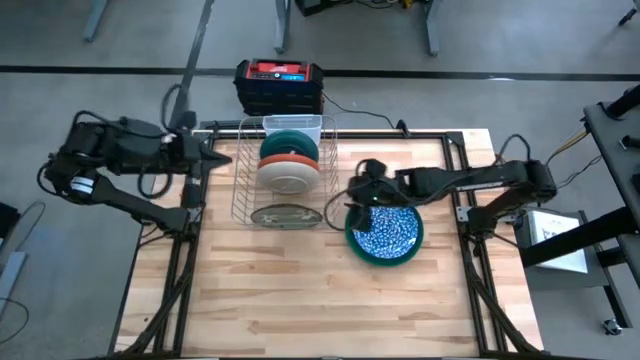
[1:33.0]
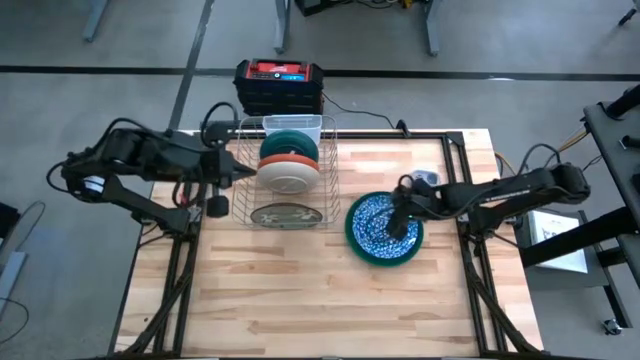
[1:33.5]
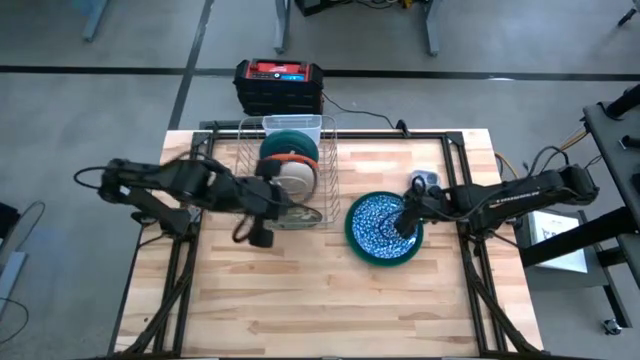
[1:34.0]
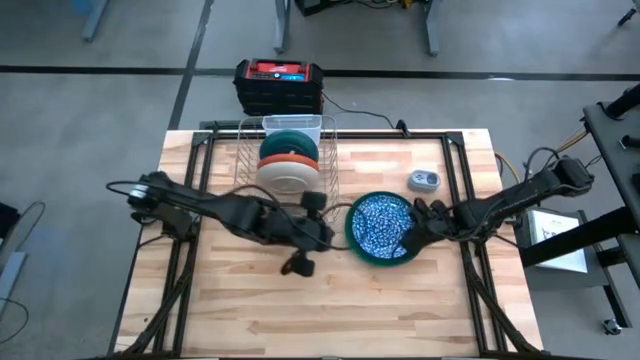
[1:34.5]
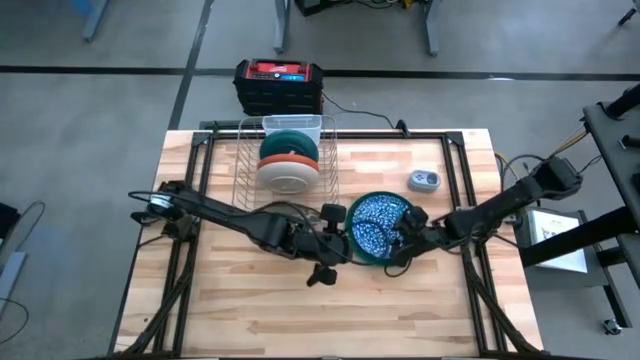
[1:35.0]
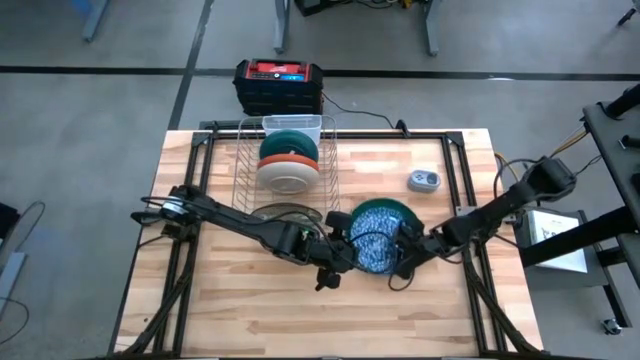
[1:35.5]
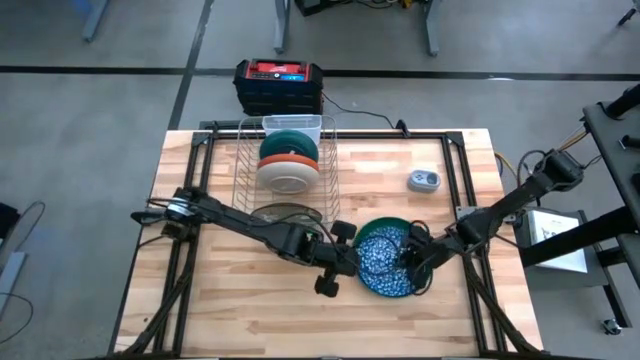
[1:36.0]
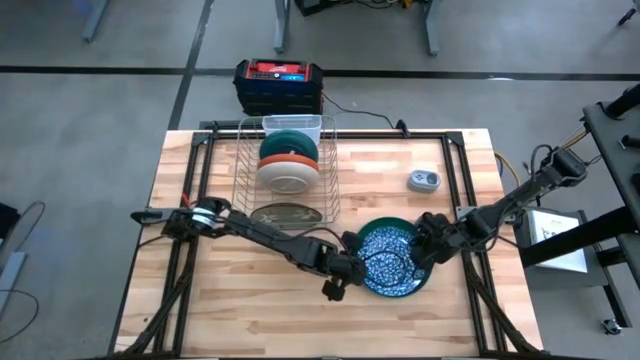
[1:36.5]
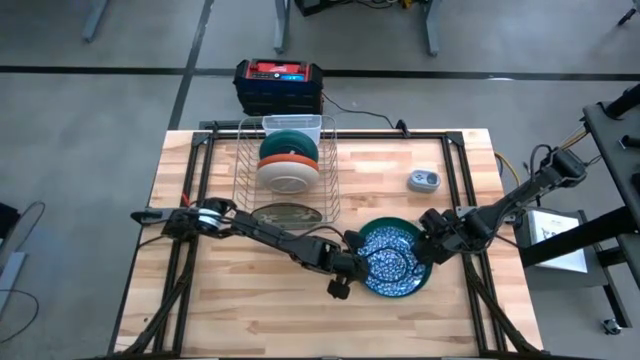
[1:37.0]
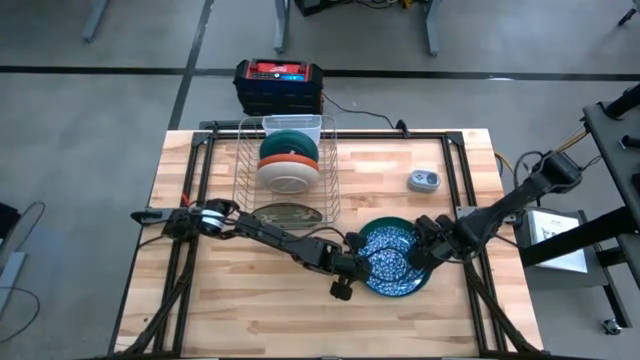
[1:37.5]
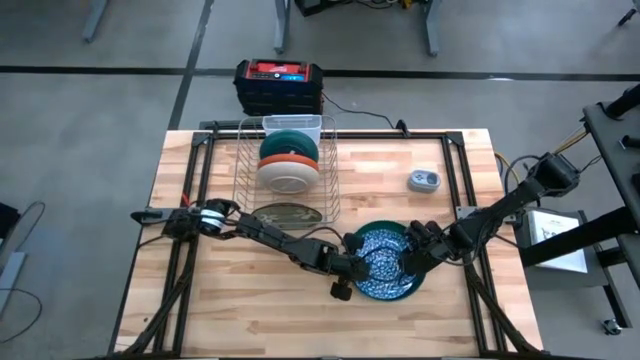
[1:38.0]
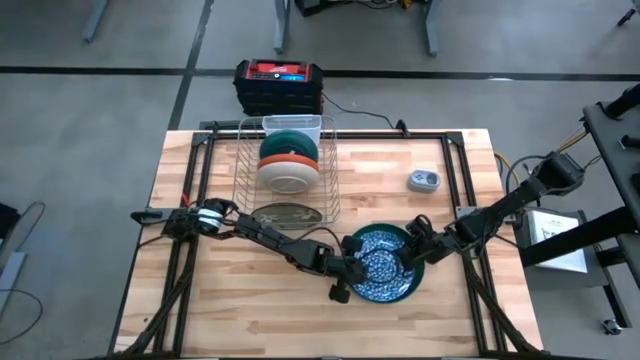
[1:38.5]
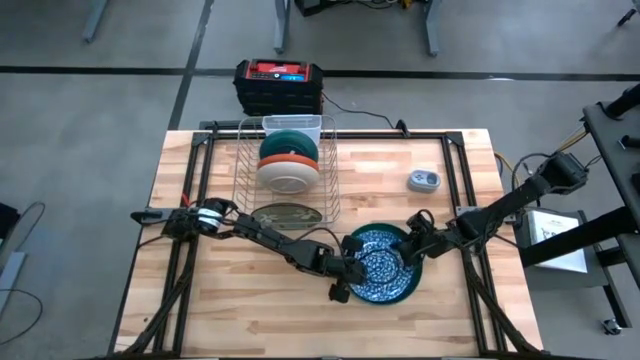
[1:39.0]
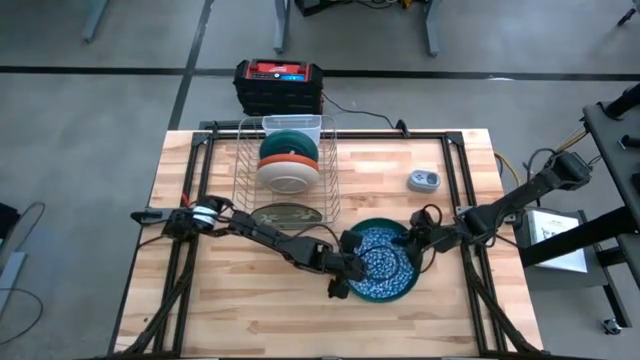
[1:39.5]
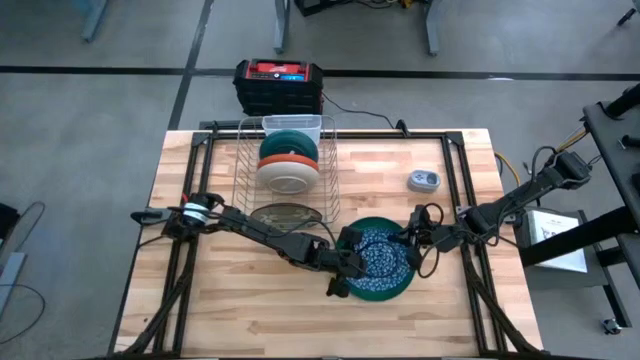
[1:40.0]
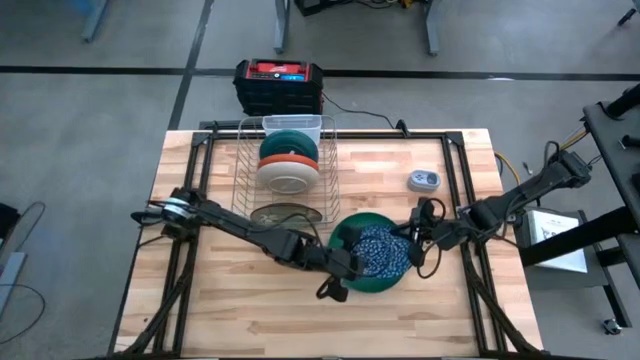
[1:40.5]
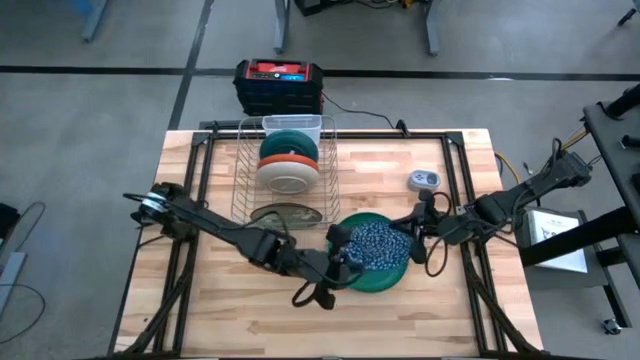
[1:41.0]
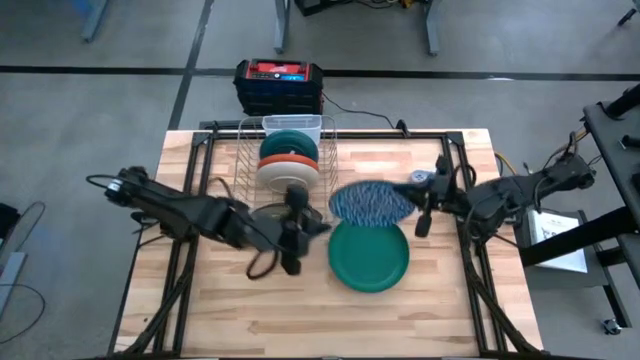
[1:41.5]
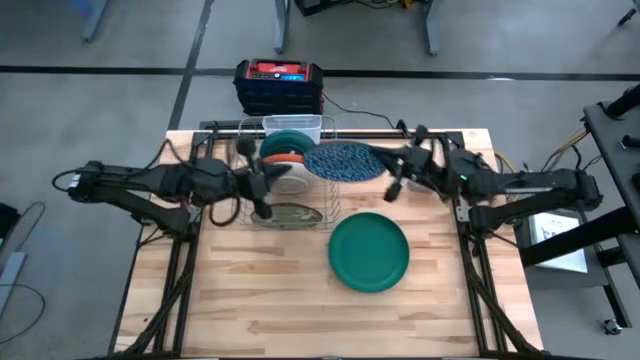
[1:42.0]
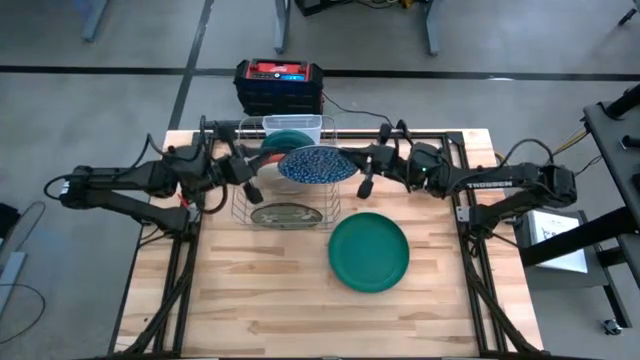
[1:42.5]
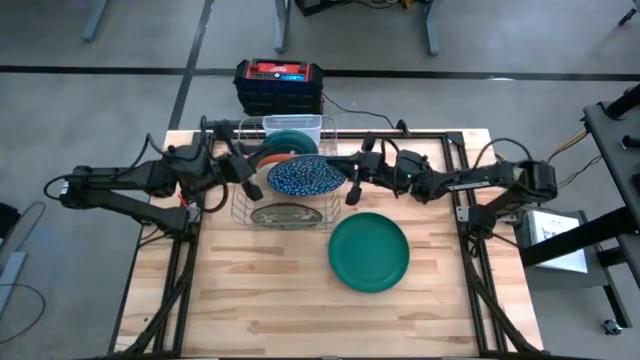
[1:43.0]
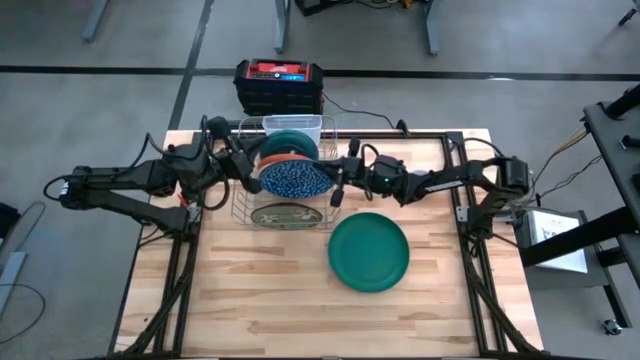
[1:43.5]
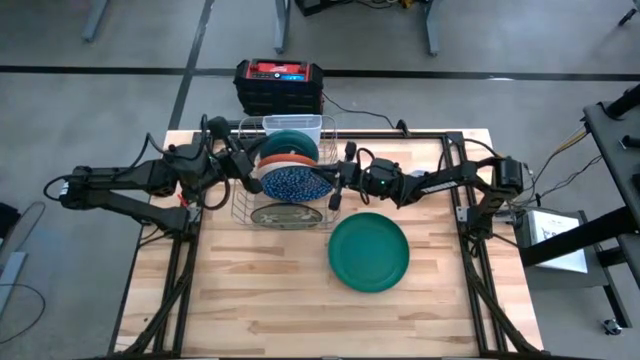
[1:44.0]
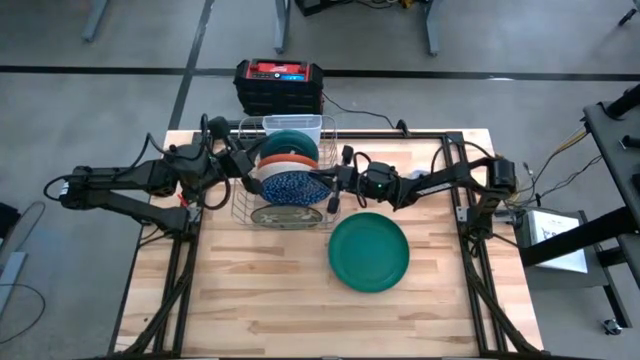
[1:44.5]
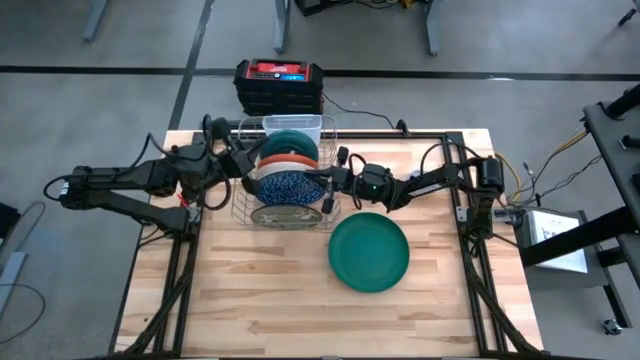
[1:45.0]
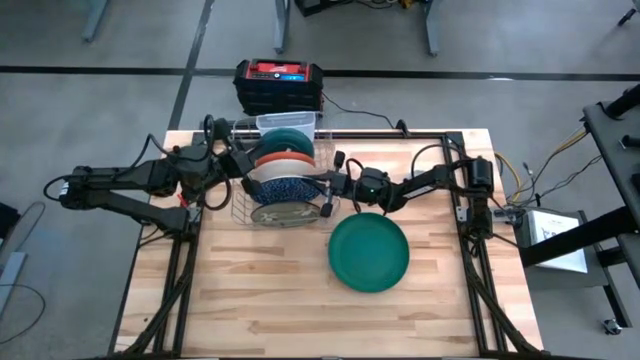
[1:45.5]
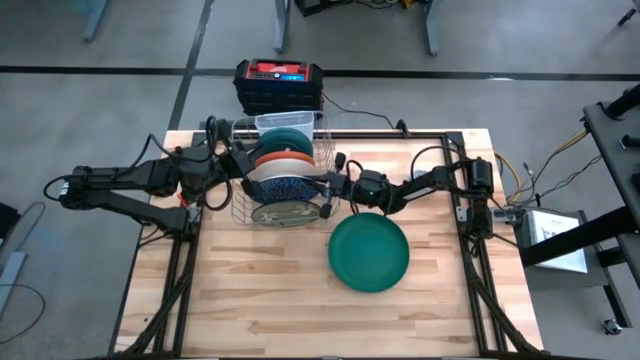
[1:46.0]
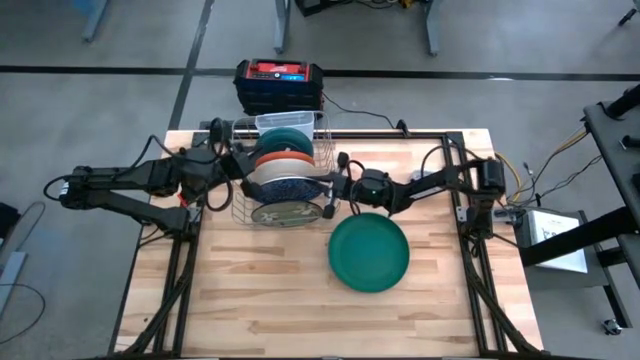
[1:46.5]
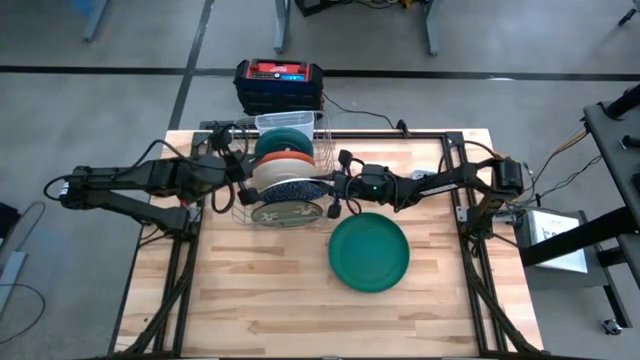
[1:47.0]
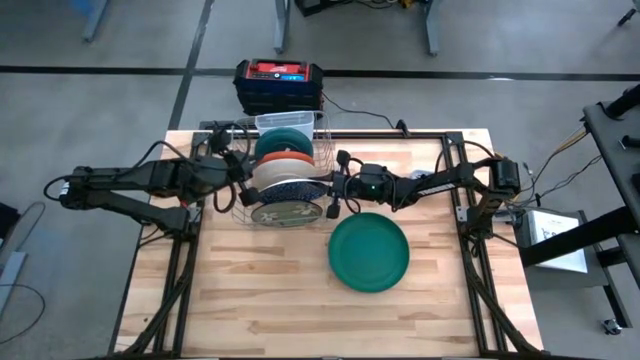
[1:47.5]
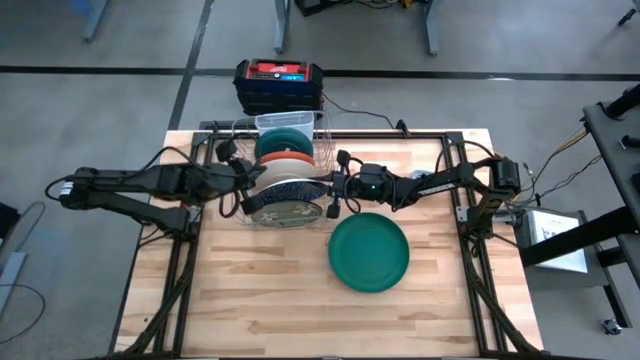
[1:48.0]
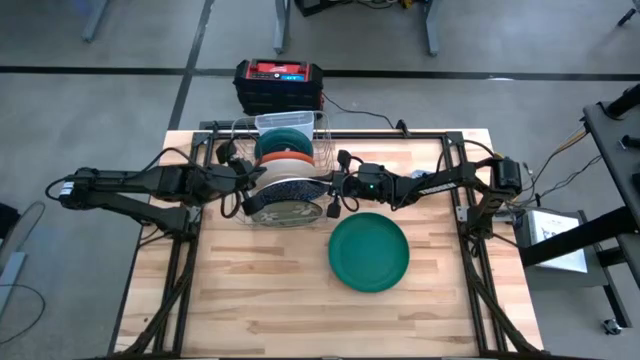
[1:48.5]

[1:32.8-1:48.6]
Task: Sort dishes
Put the blue ceramic plate into the dish rack

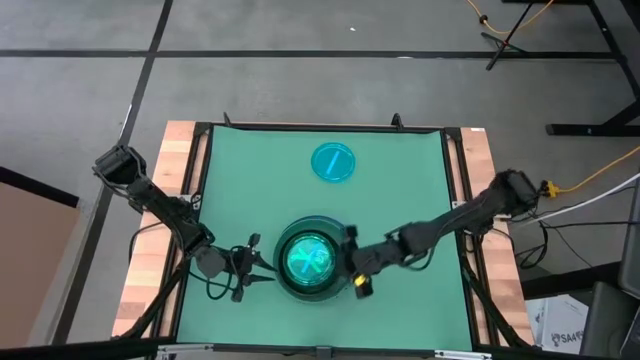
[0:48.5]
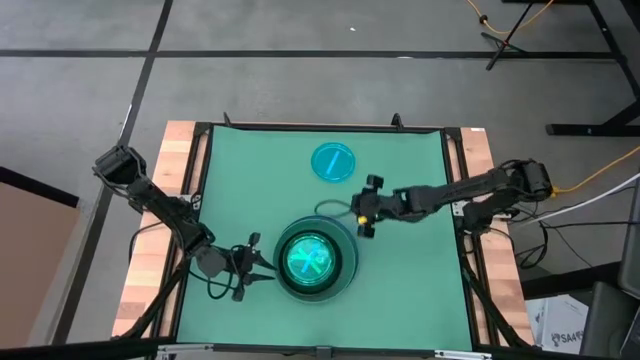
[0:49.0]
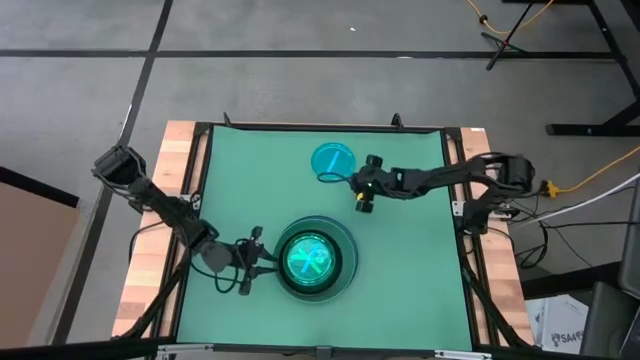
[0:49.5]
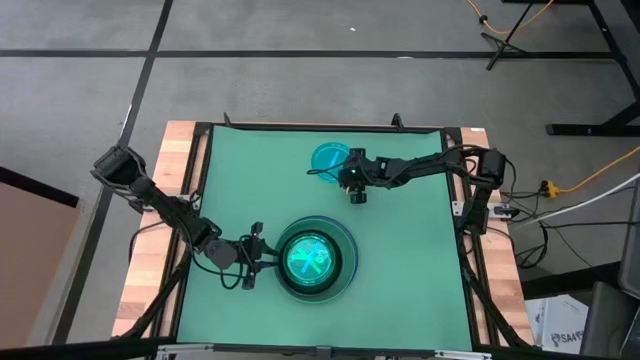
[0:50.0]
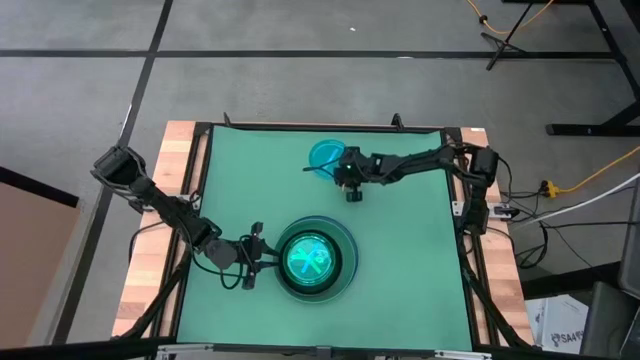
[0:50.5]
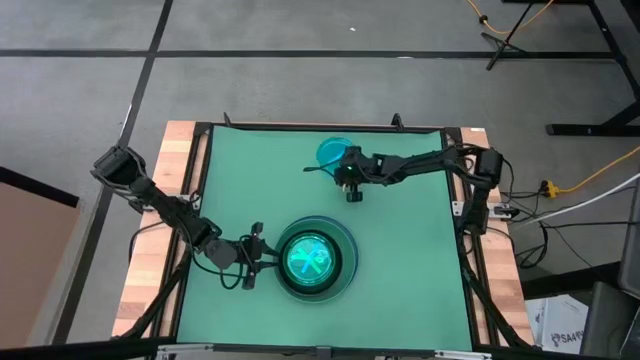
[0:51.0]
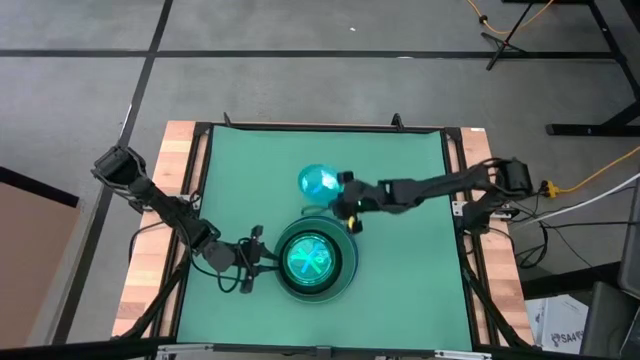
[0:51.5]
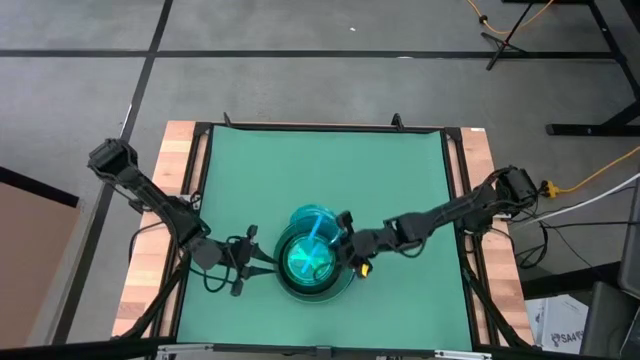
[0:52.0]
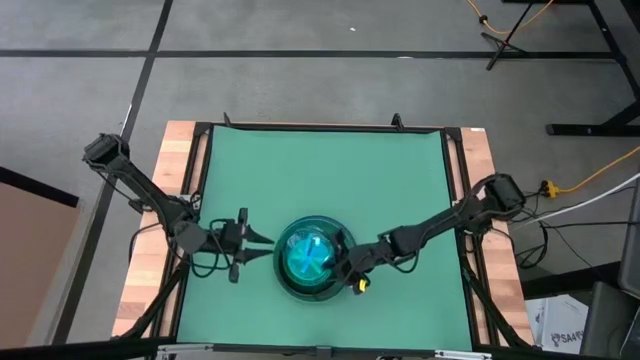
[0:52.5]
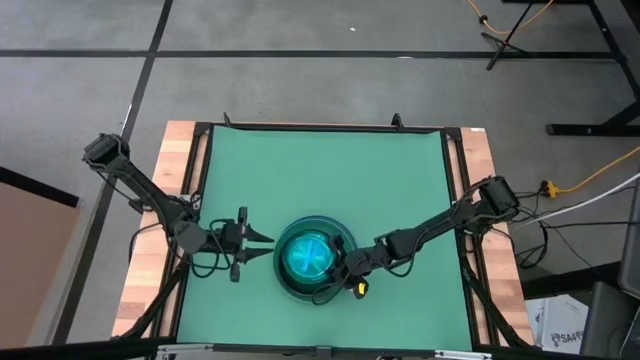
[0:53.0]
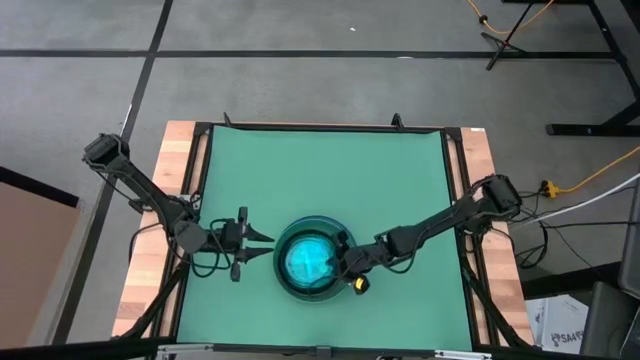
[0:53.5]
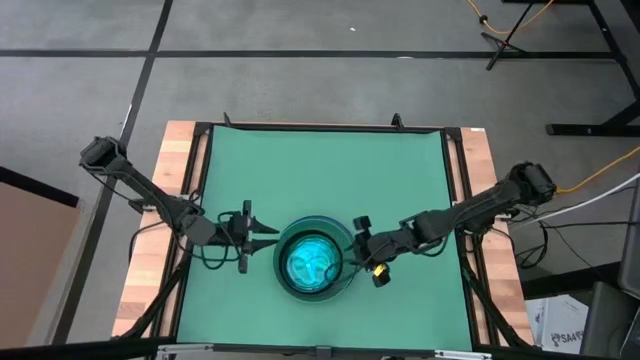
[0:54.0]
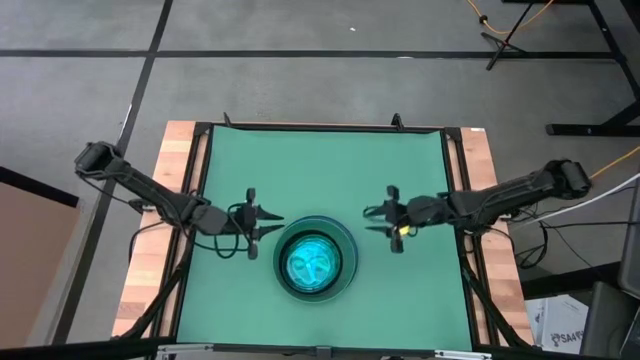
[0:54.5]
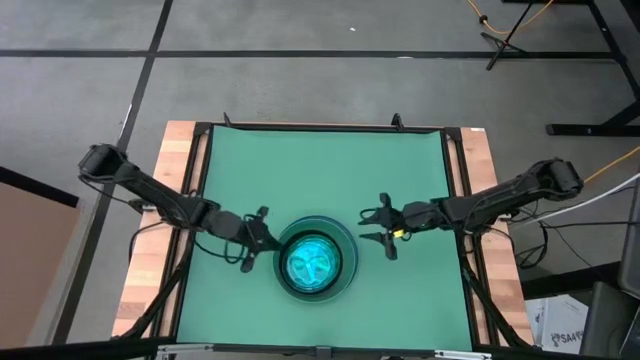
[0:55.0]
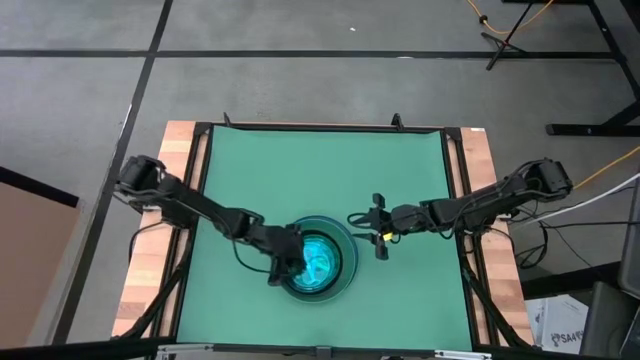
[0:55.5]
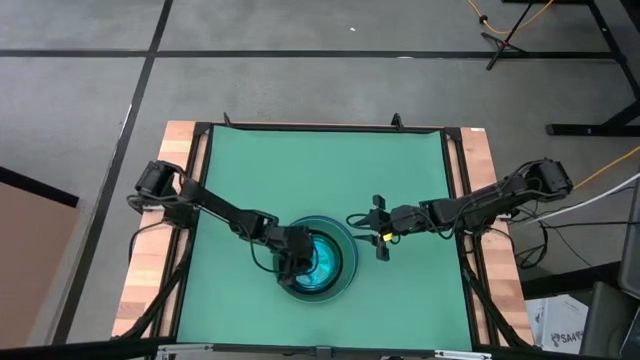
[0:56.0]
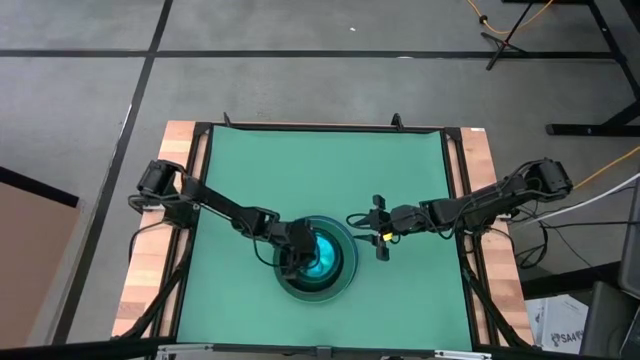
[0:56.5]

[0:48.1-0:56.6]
Task: Stack plastic plates
Stack the blue plate on the blue plate
